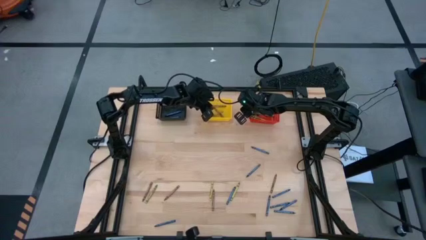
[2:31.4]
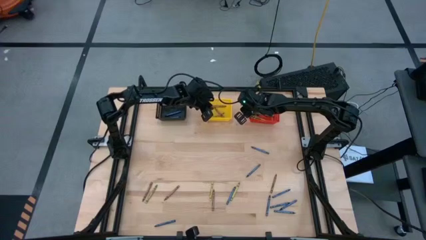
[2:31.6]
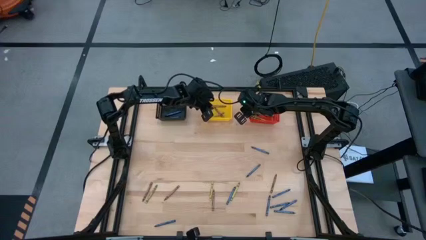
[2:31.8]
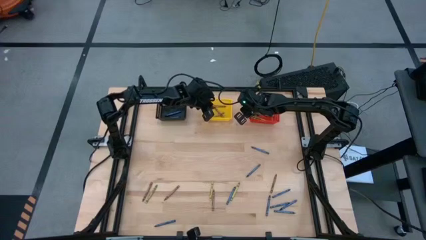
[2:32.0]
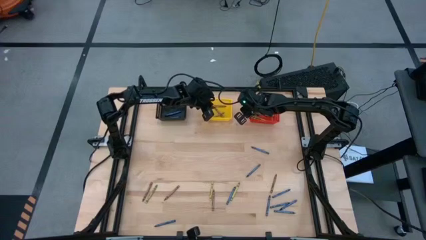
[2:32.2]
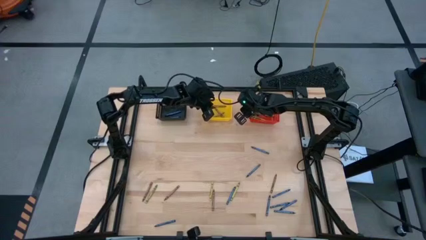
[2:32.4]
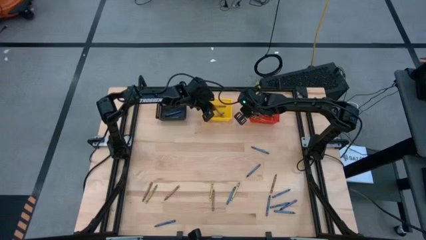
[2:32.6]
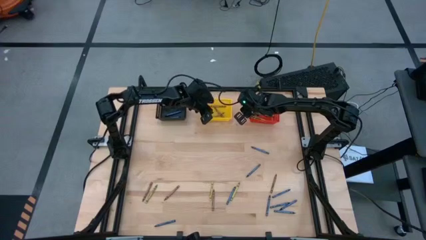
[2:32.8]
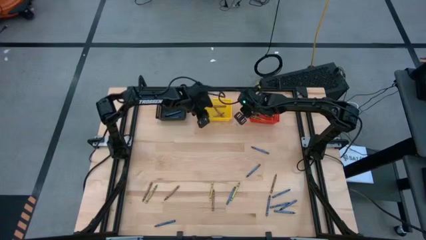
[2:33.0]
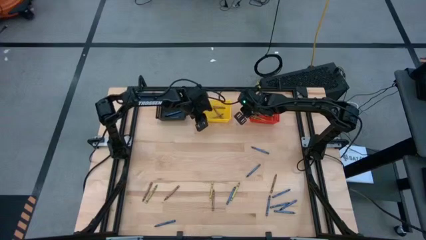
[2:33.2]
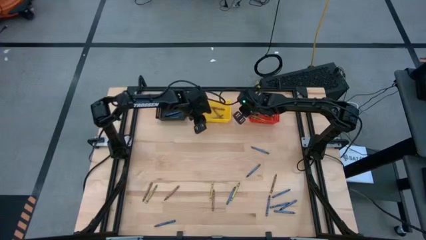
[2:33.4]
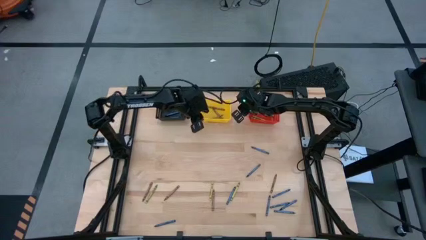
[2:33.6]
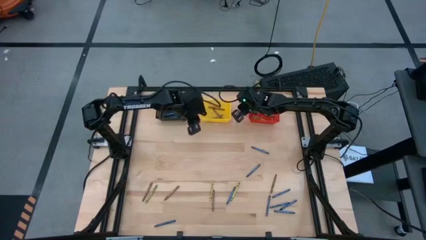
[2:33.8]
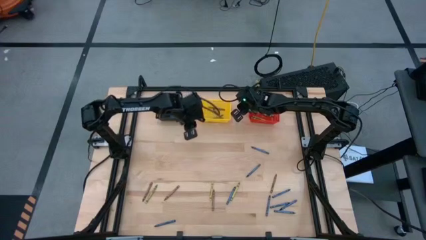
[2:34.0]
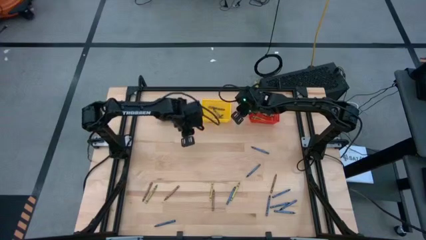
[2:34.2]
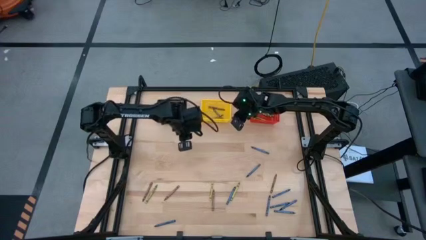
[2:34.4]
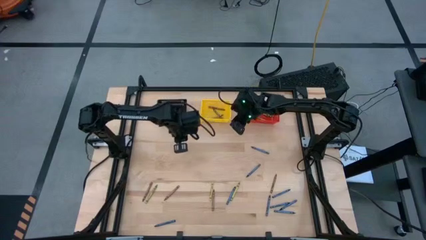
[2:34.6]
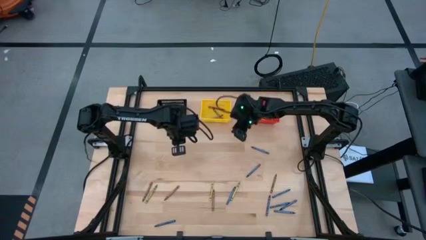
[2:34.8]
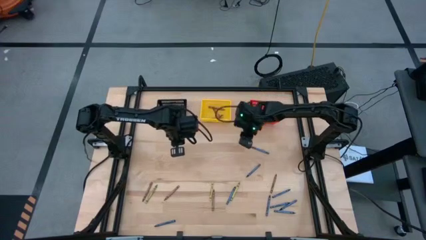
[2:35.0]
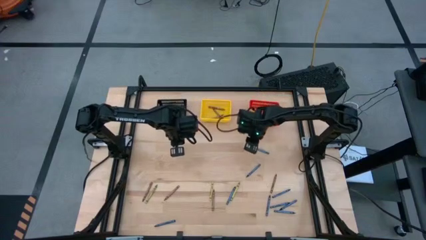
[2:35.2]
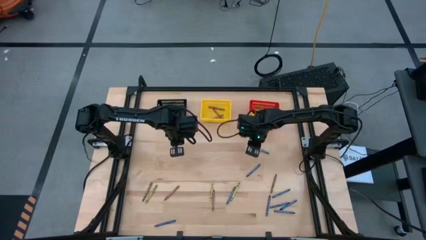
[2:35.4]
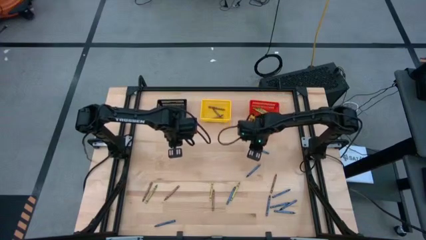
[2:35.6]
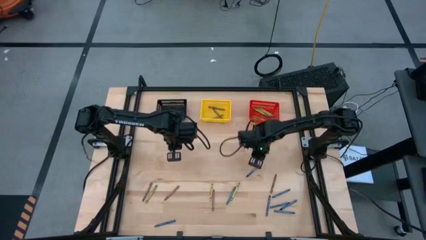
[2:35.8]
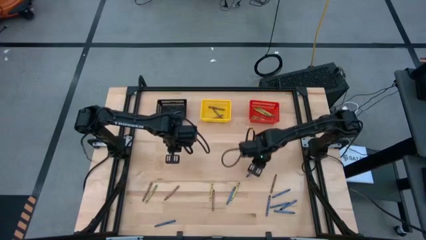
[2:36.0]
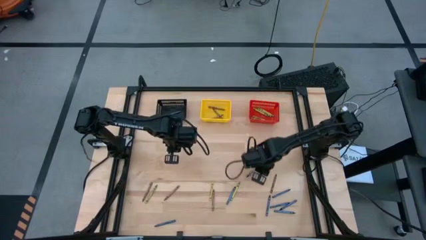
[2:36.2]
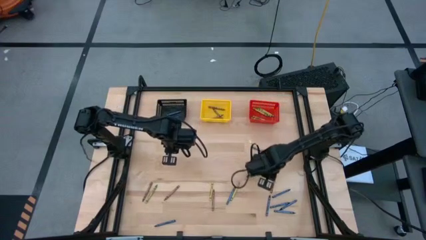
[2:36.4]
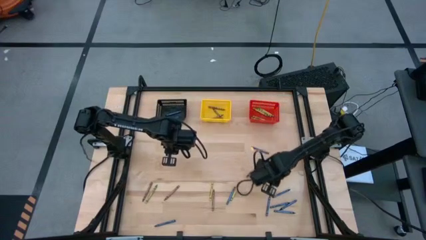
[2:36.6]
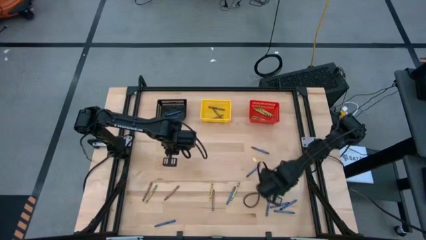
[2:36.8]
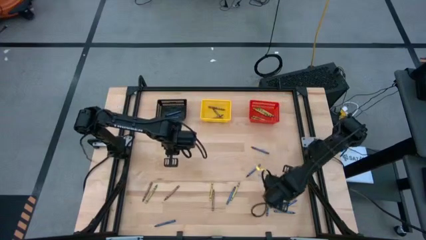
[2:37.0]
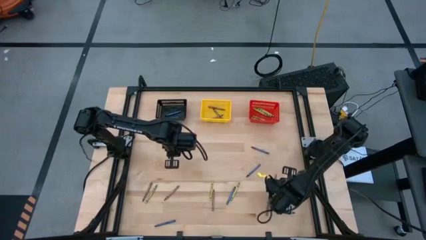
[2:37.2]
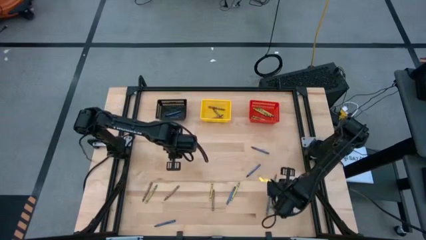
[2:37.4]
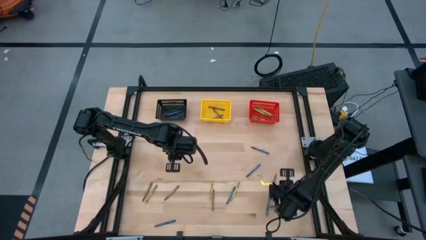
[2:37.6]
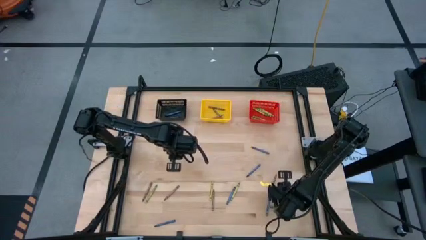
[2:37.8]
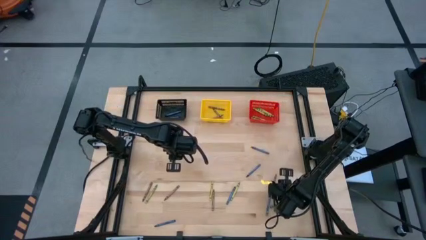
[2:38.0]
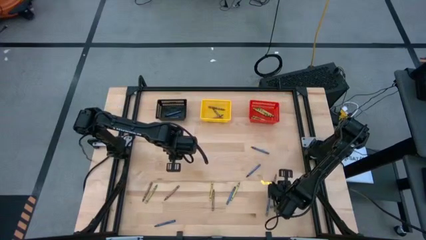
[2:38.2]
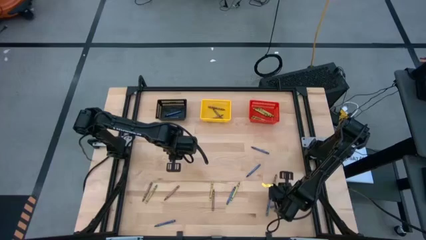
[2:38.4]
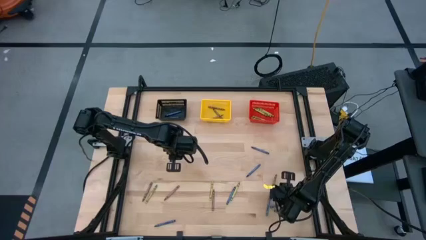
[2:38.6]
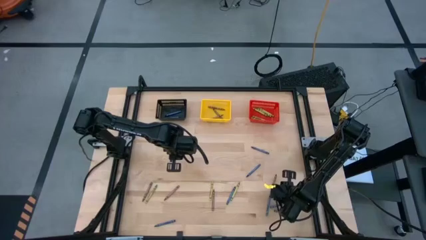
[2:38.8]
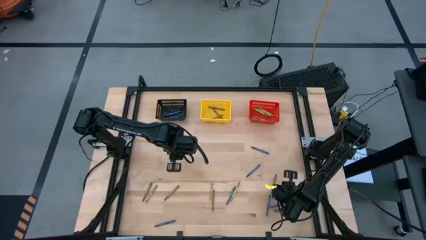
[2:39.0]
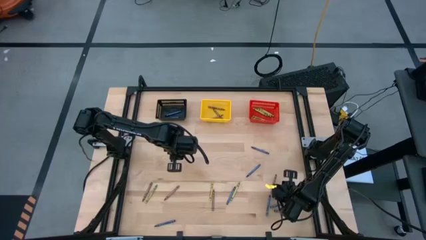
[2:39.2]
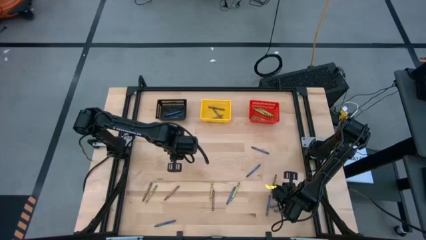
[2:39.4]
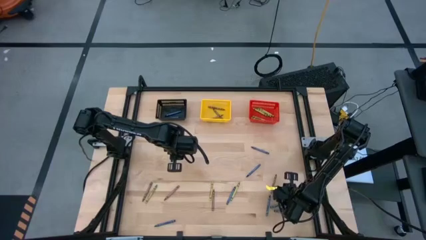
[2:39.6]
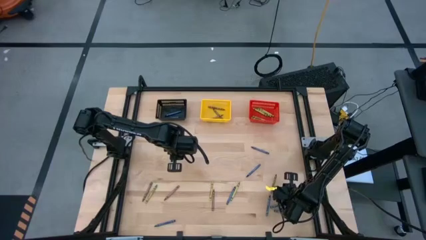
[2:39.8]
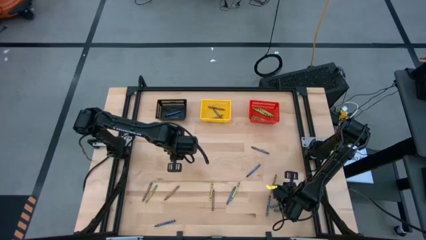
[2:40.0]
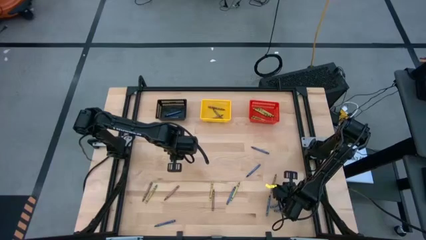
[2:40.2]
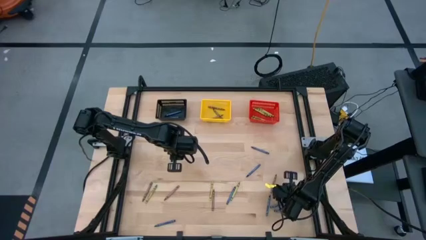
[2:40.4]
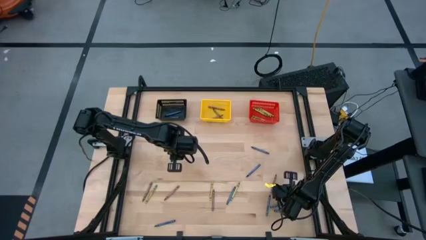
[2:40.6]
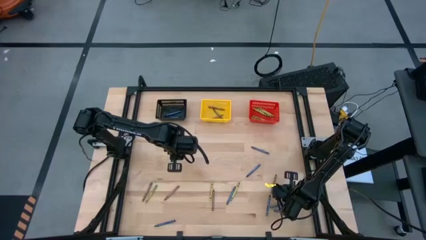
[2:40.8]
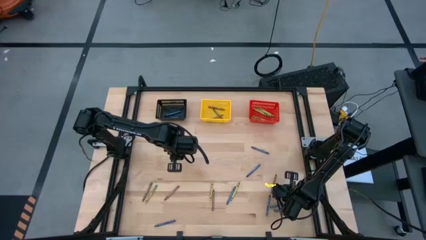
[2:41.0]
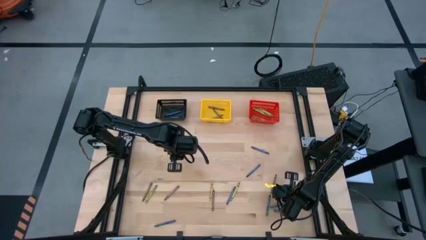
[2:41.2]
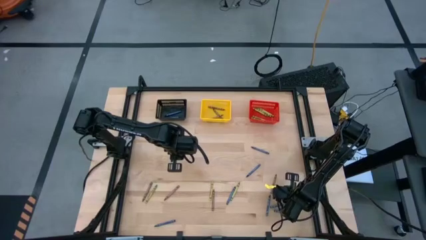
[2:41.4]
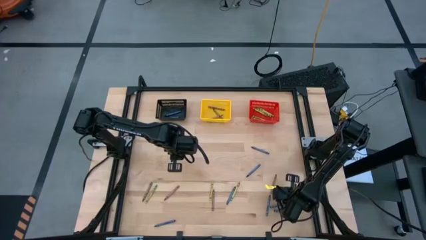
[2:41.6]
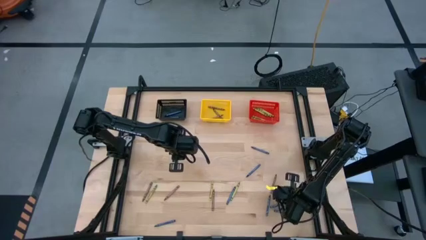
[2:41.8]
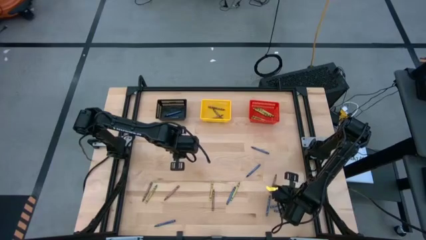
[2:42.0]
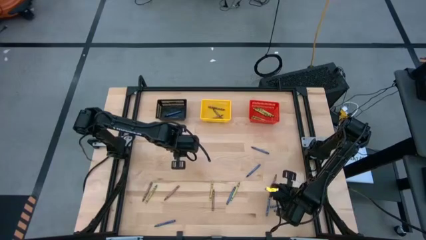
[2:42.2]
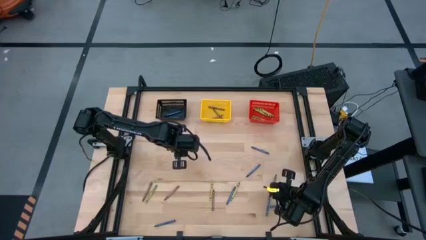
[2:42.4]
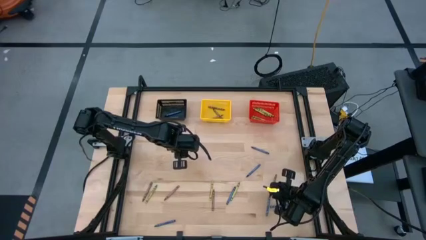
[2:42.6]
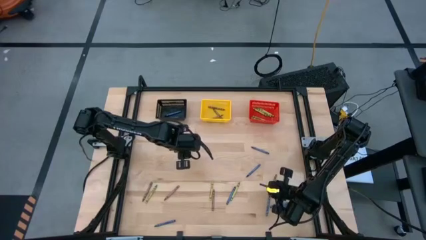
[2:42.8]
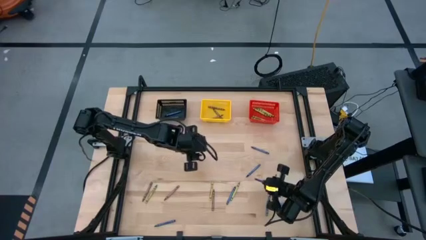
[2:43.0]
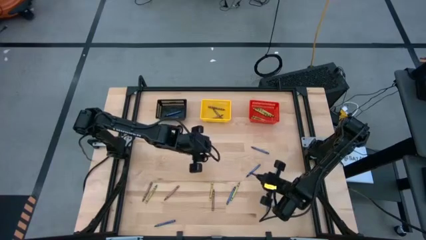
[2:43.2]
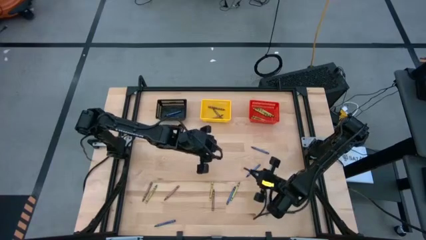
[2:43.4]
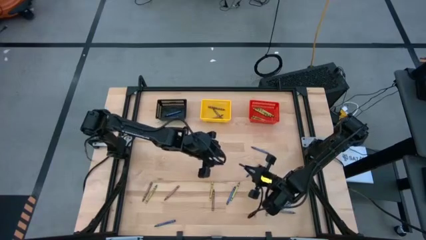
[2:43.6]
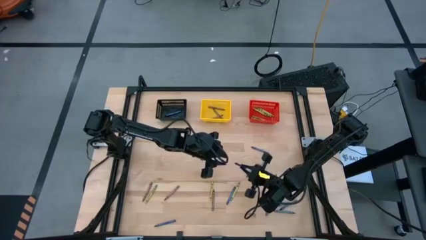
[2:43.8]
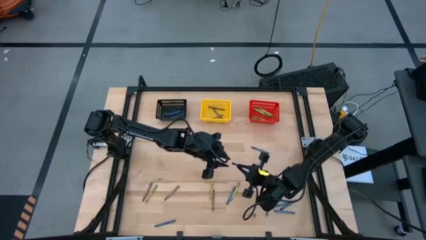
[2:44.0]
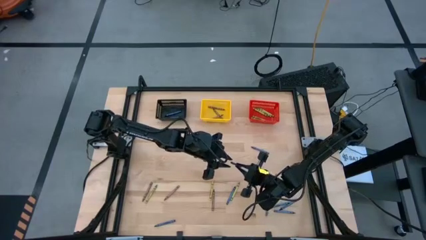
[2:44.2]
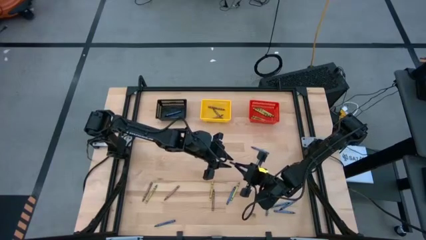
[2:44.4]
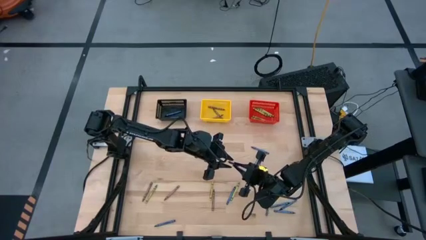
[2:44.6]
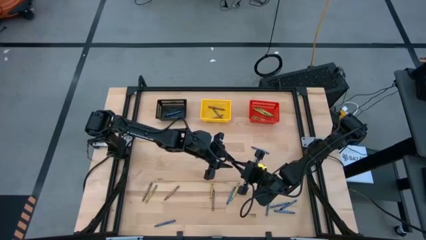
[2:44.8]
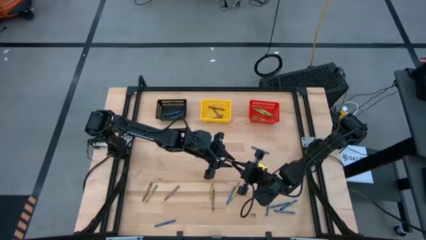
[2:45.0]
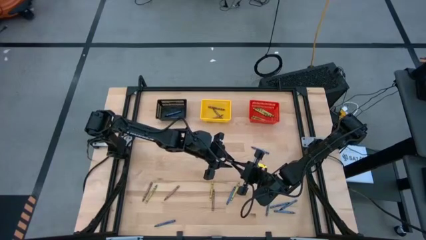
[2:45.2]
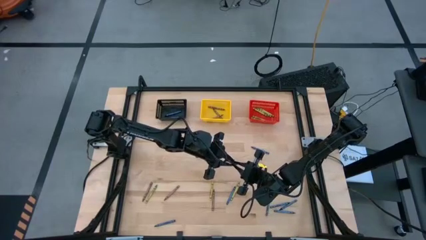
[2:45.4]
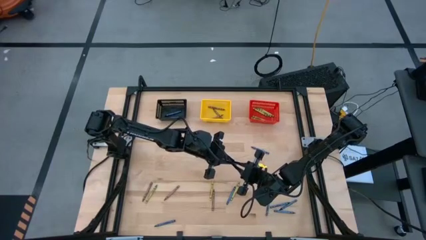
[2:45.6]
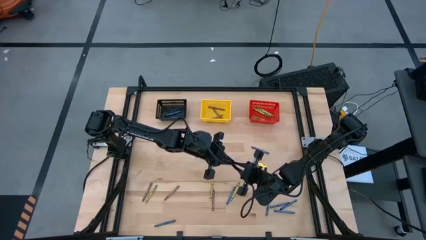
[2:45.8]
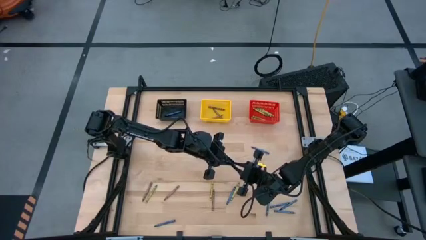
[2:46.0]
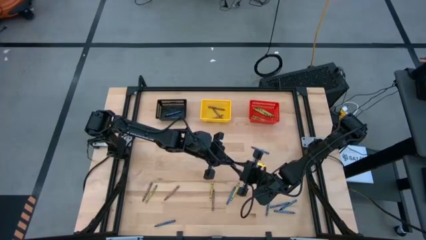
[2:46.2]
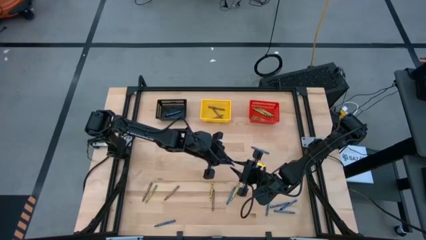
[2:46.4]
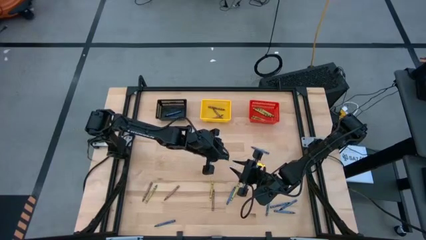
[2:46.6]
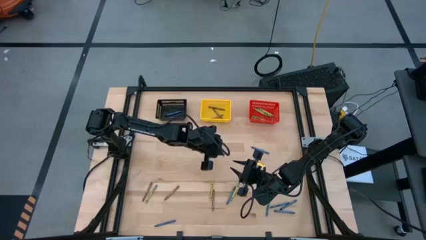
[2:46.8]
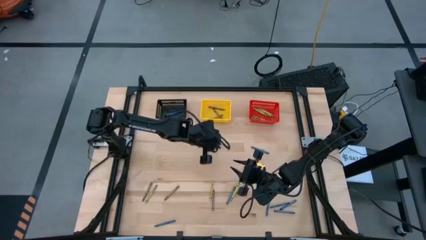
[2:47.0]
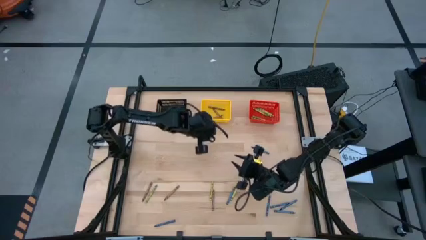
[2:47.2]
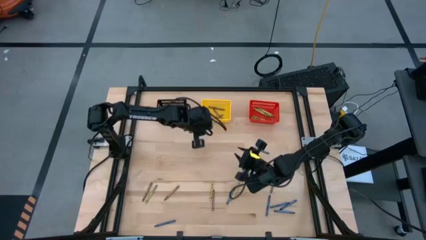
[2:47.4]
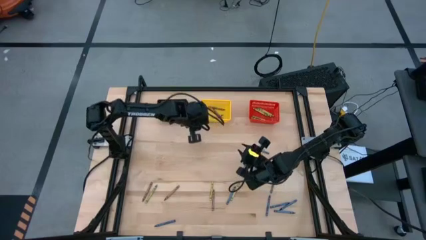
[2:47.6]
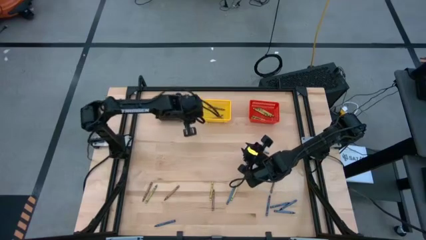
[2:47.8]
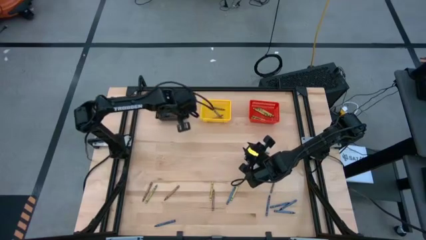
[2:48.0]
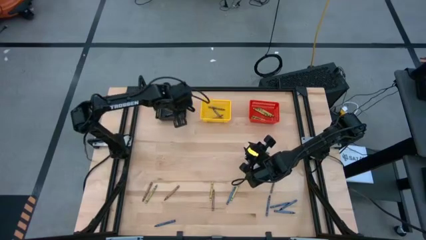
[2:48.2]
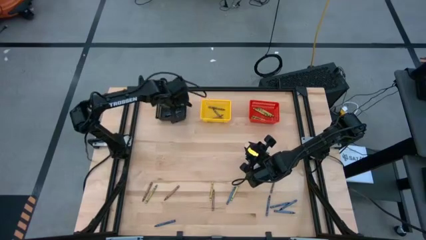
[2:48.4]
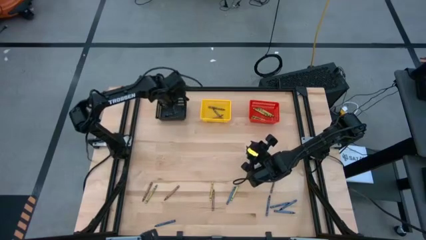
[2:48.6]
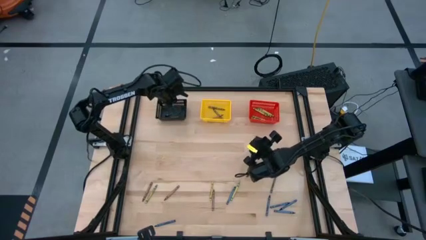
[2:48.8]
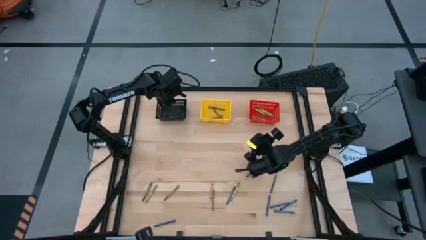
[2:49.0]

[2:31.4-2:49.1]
Task: Sort crayons
Put the blue crayon into the black bin
